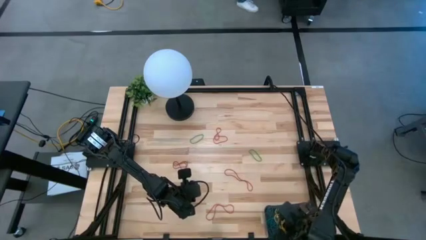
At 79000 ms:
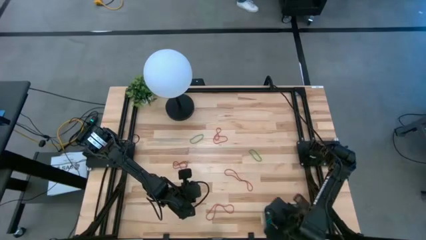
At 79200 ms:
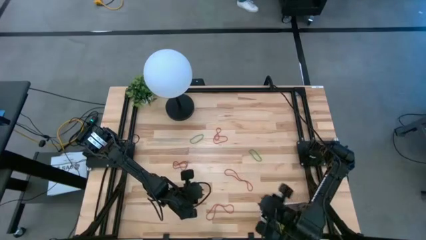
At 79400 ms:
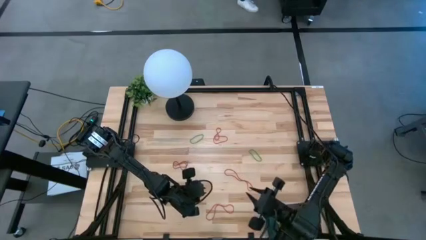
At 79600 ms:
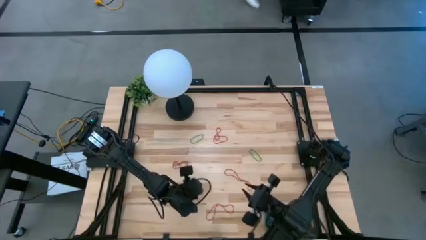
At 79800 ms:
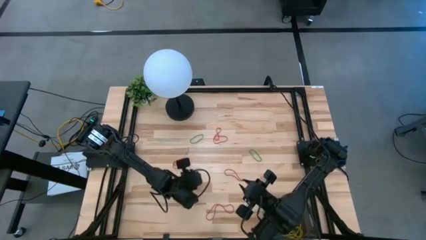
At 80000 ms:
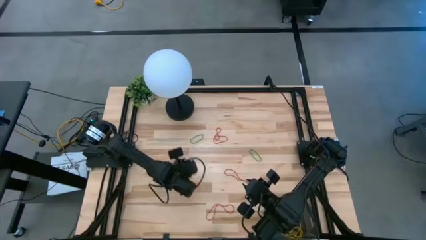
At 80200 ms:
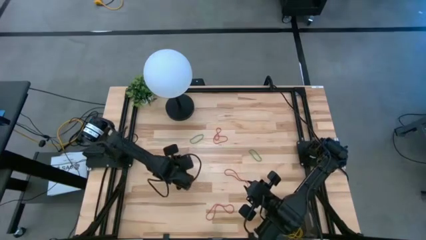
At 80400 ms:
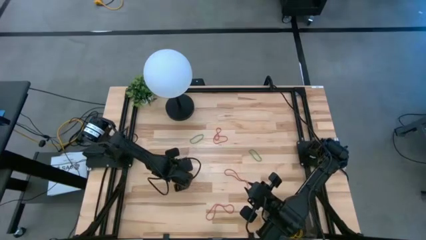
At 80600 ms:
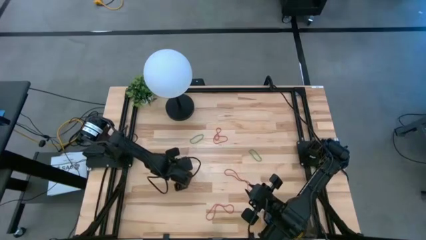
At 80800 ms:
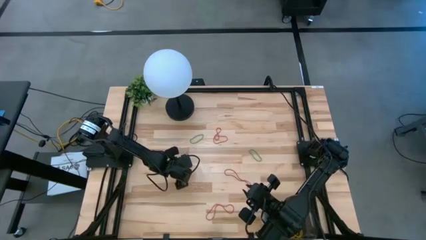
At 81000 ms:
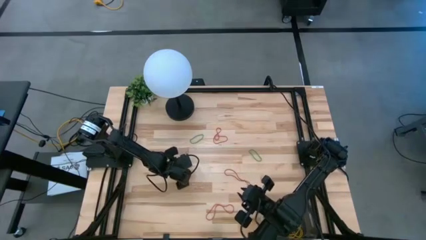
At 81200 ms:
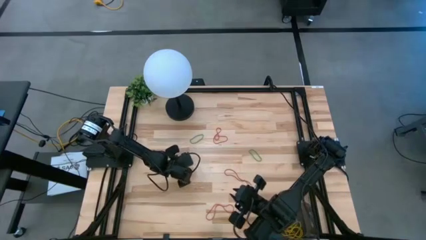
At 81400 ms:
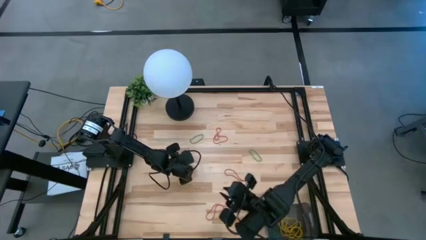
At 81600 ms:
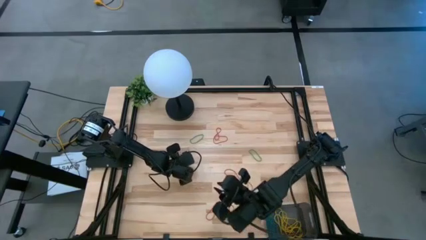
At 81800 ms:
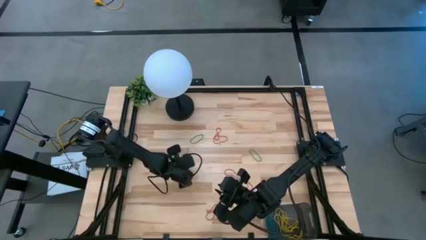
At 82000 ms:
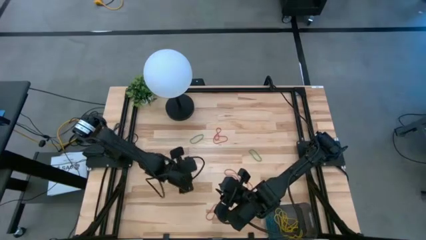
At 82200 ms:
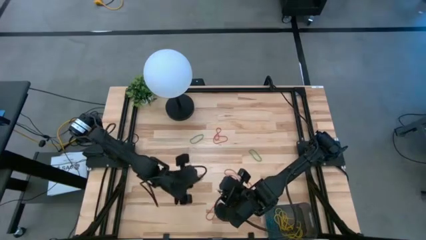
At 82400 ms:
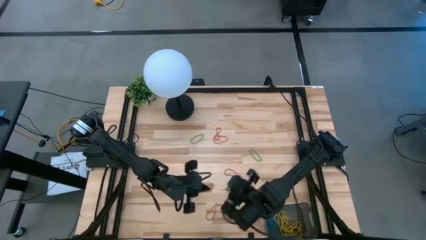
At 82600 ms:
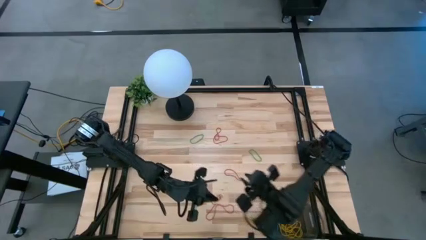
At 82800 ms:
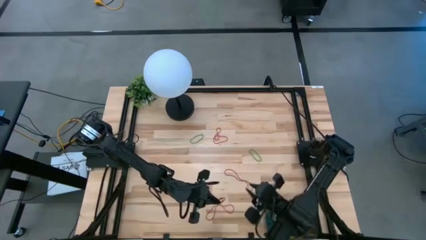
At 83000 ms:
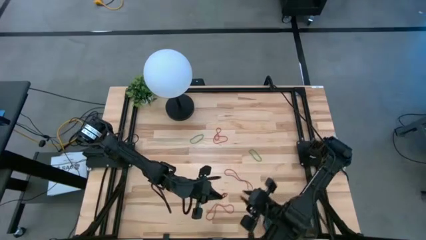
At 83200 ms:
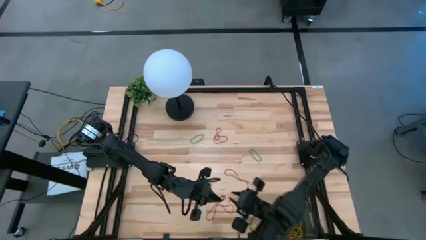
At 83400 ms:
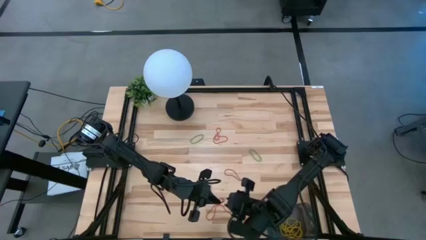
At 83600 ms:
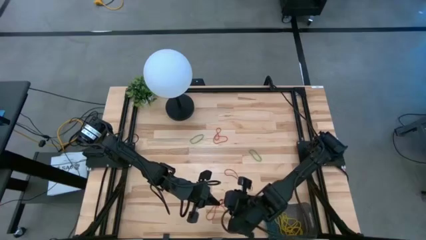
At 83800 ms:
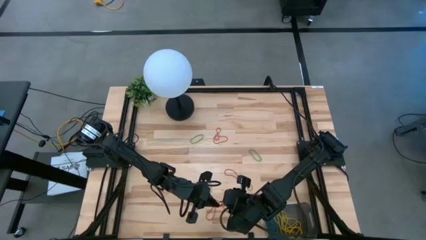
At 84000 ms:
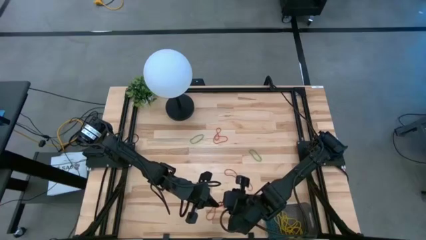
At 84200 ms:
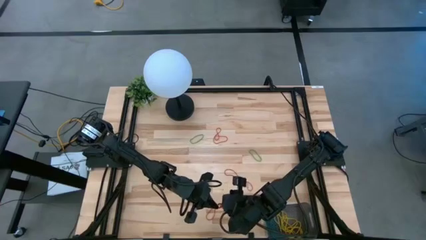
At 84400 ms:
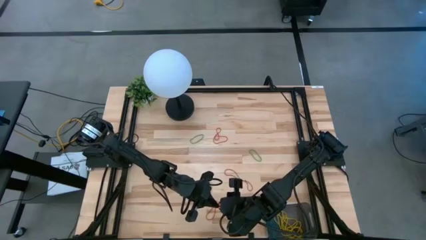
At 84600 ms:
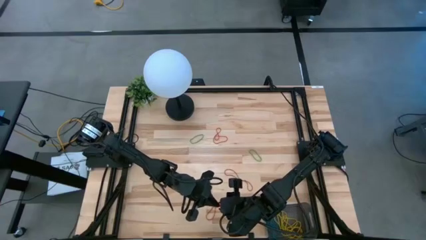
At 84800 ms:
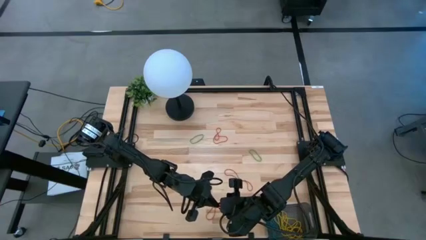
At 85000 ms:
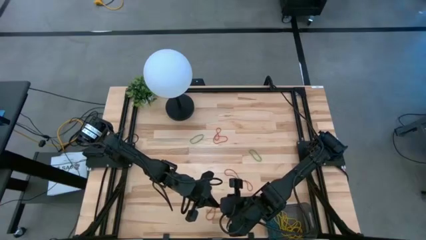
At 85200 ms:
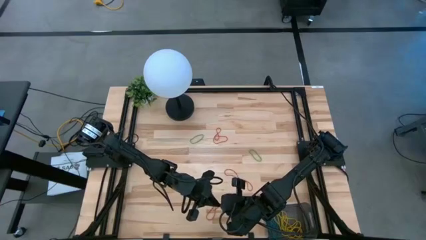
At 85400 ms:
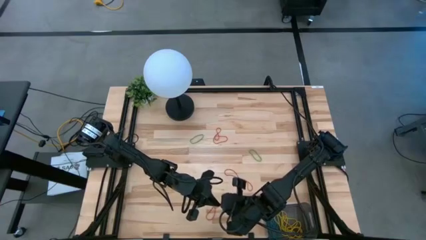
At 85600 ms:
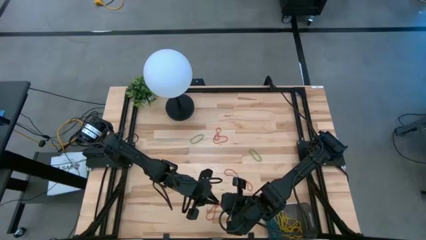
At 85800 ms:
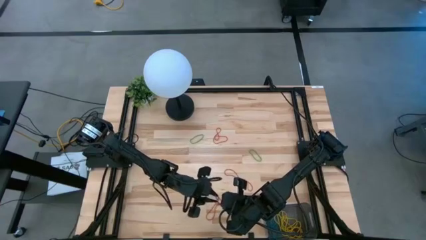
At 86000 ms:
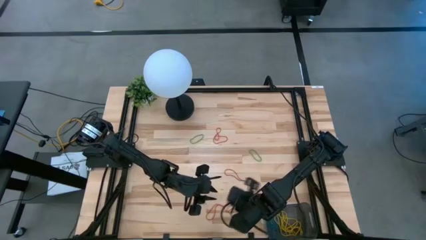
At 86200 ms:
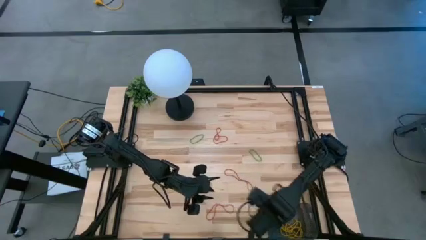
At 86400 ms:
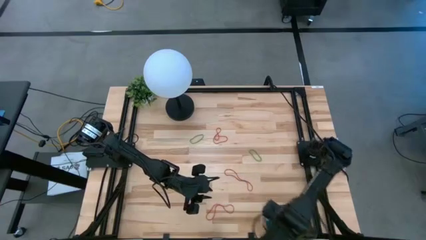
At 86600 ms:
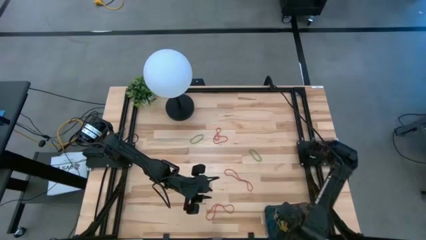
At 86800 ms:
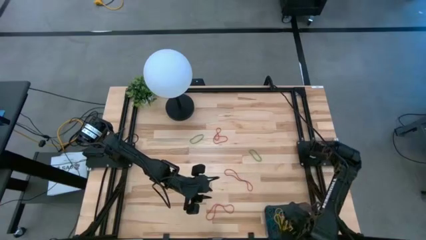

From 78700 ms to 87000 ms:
Task: Pick and place items into bin
Put the red rubber band into the black bin

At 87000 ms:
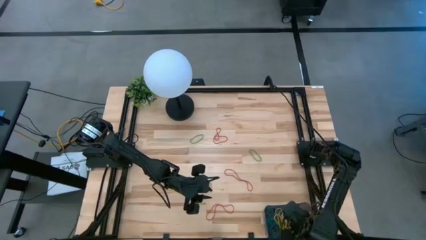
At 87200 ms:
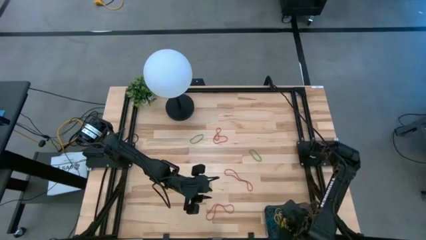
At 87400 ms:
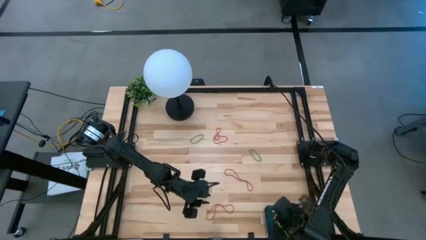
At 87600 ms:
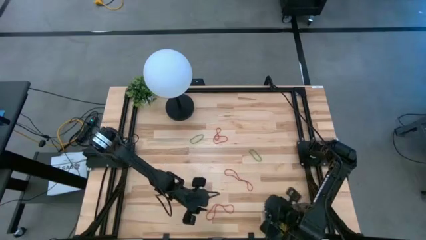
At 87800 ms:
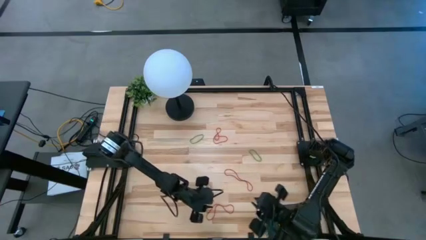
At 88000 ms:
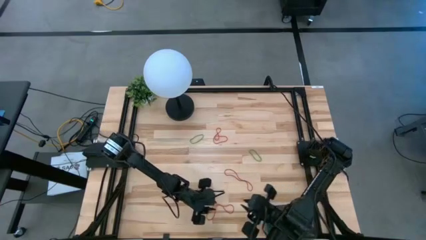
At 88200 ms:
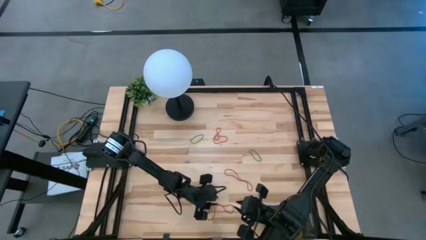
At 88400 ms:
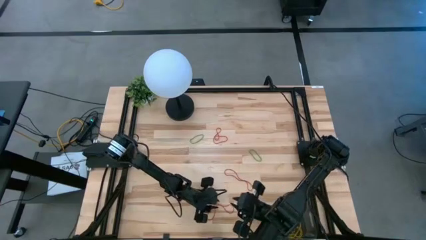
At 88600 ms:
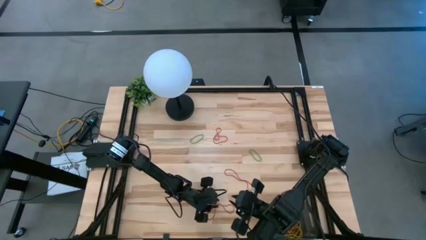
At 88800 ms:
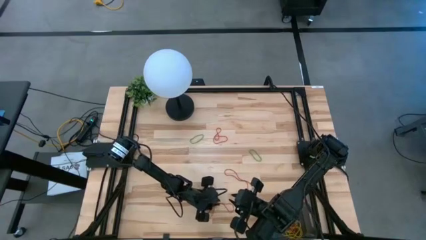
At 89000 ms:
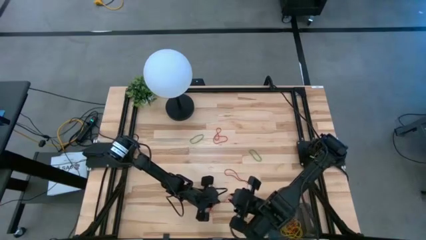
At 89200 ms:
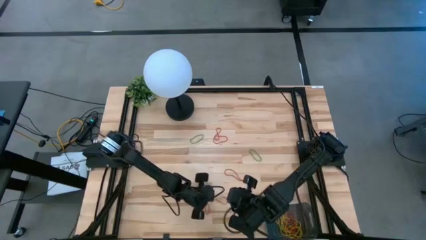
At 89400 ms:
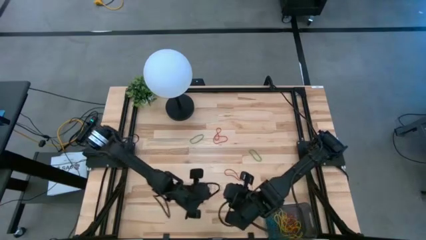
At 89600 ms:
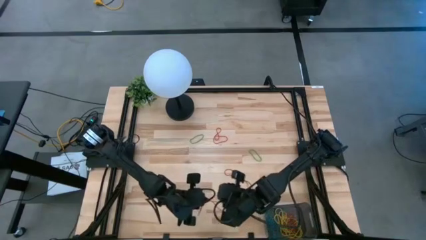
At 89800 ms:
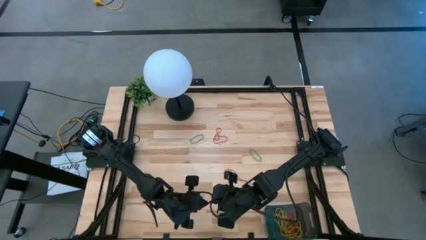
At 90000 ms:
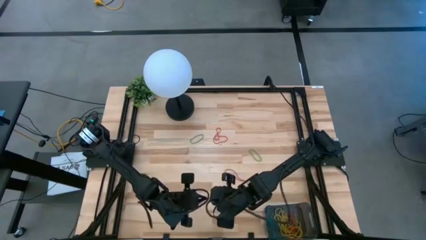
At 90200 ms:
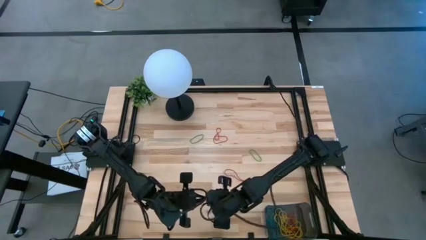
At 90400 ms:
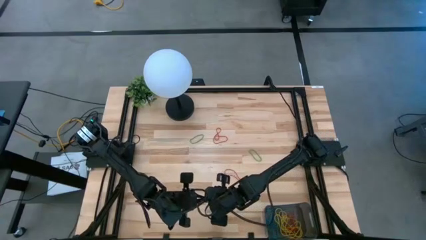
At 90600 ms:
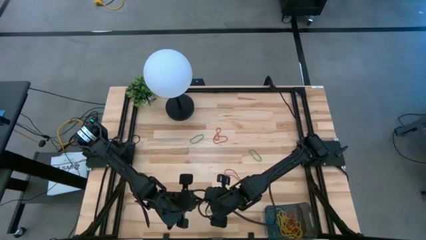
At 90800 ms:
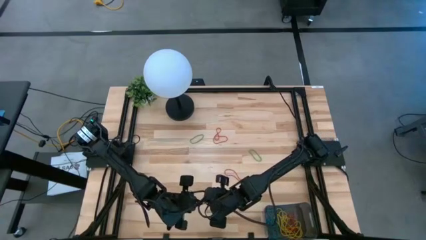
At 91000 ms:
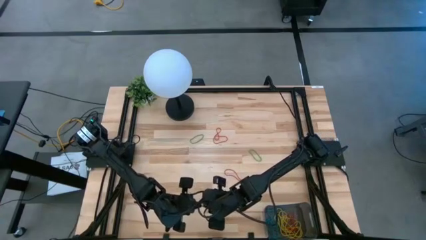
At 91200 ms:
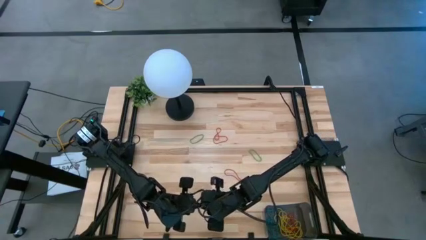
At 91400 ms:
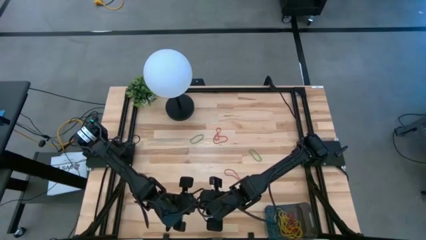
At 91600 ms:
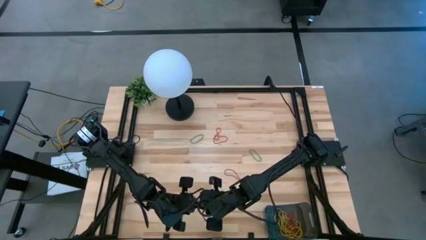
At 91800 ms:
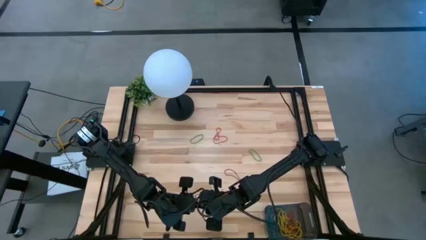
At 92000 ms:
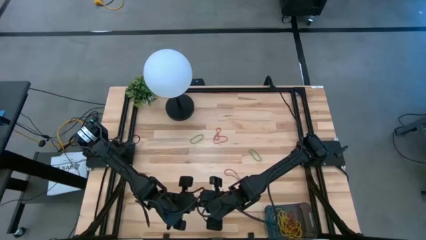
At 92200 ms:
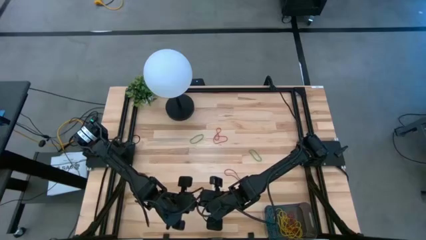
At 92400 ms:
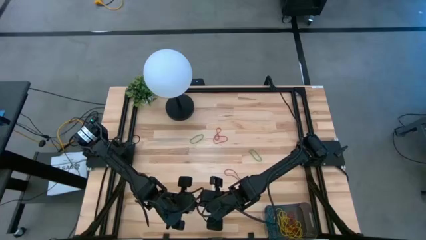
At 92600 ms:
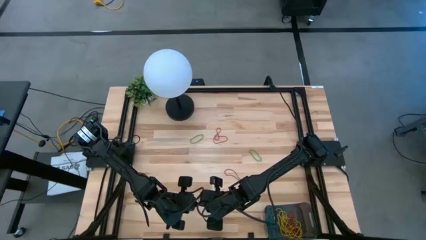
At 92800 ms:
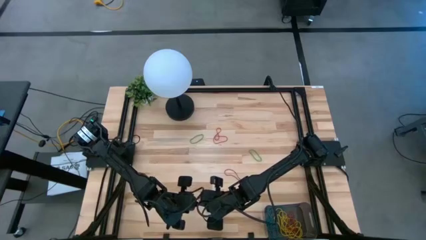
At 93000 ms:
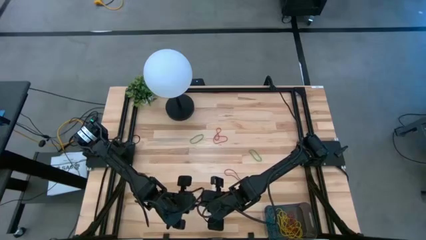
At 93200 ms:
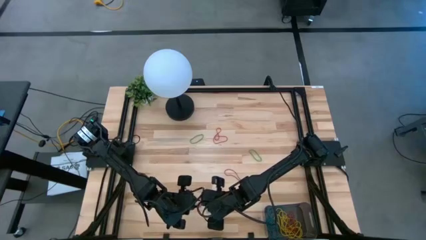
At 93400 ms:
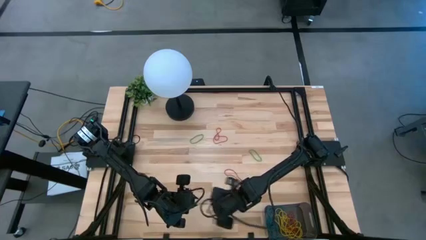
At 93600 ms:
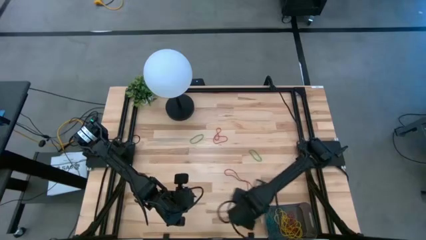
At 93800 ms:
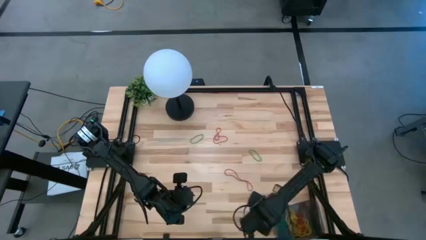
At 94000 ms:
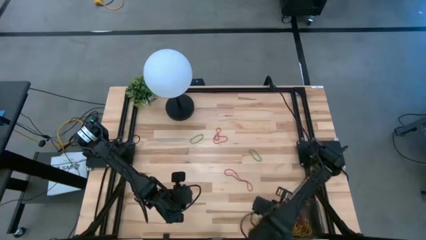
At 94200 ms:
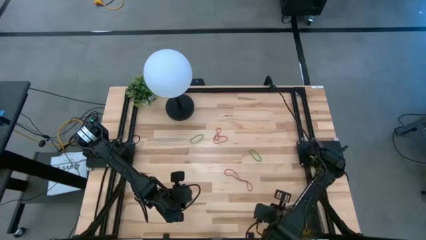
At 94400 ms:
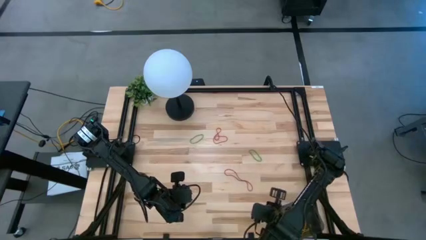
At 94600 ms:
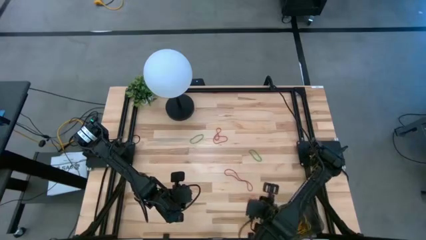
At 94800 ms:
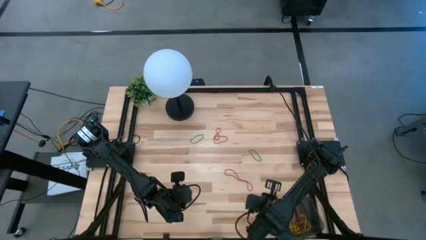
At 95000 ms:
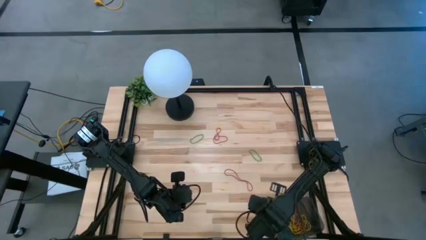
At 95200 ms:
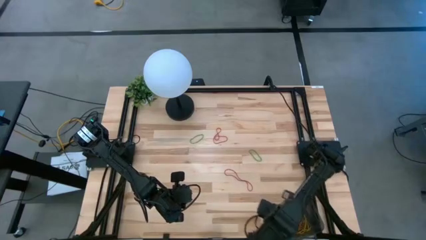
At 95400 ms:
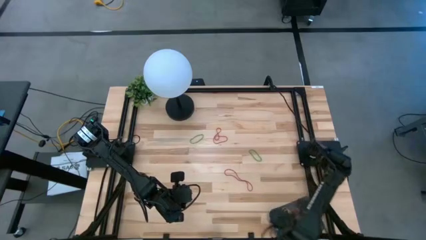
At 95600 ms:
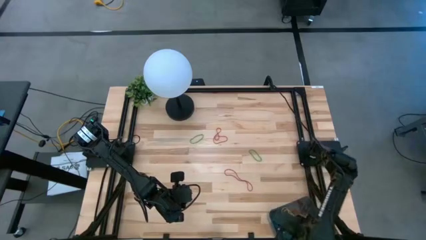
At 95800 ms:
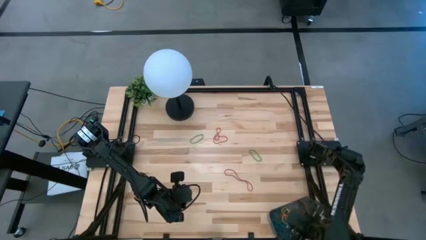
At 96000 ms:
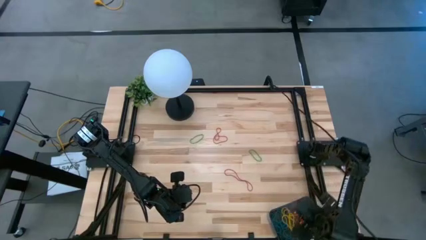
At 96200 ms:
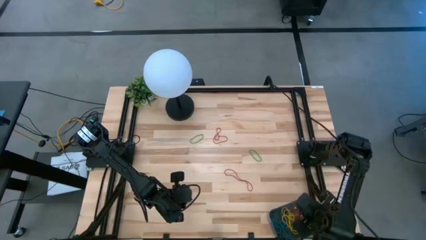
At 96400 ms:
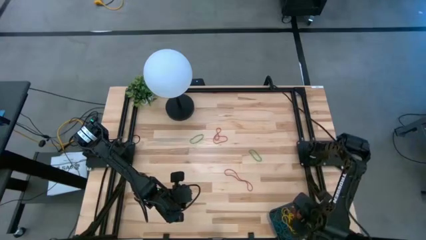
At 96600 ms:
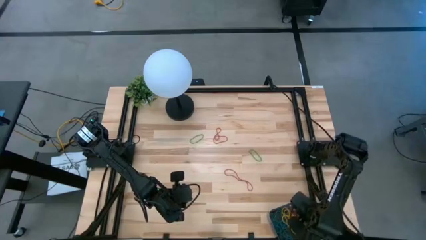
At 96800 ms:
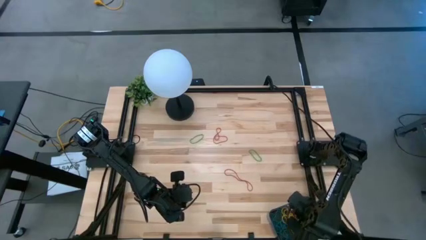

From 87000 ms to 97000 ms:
Put the red rubber band into the black bin
